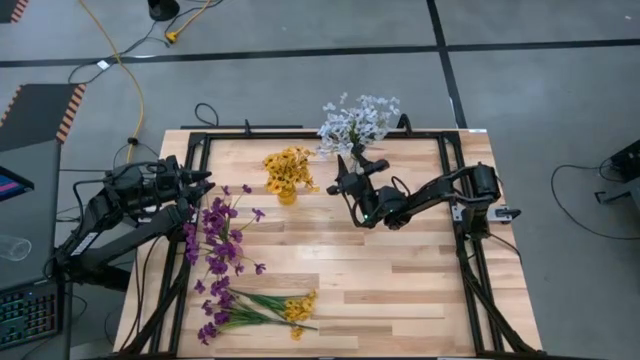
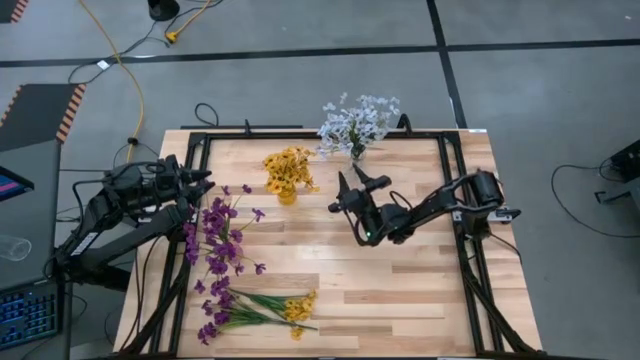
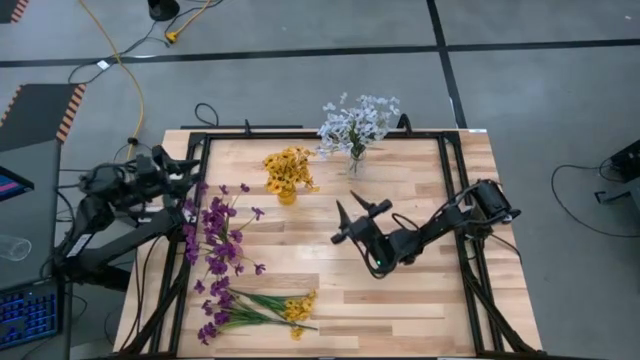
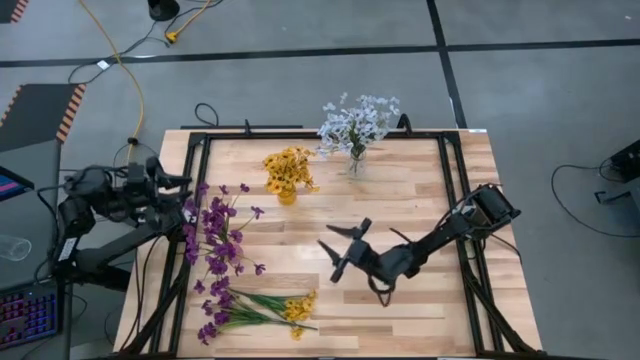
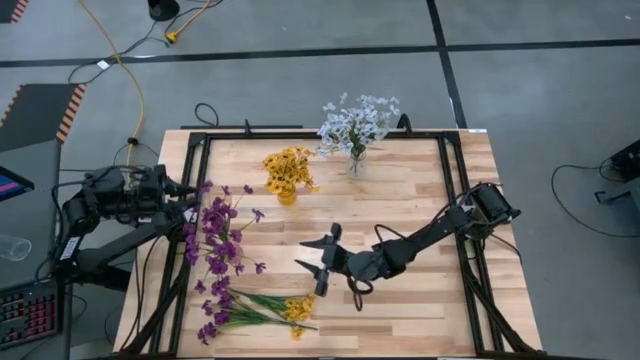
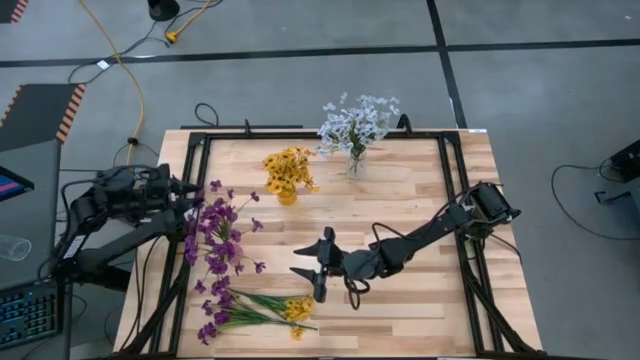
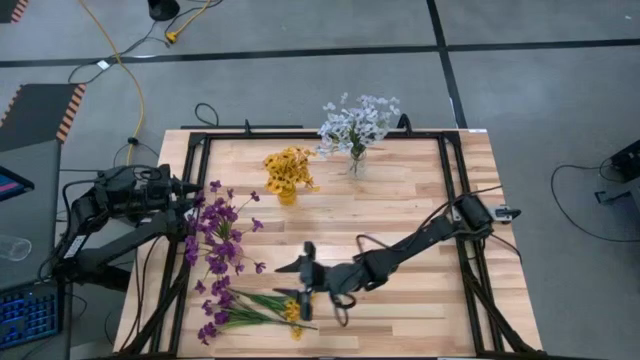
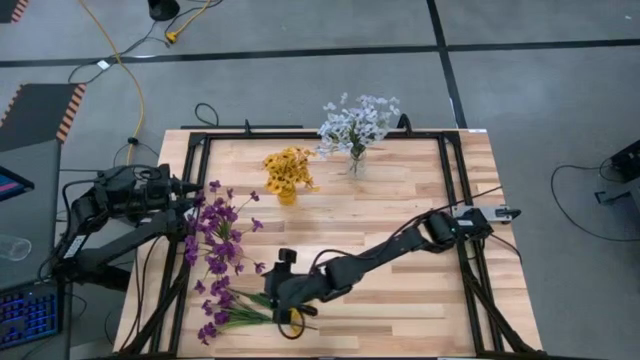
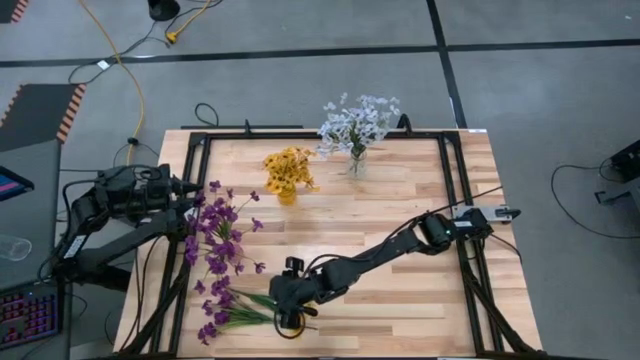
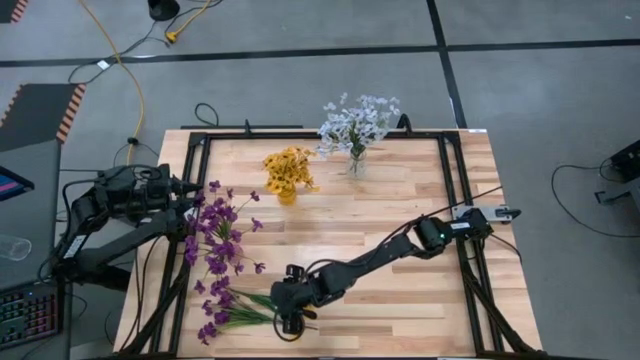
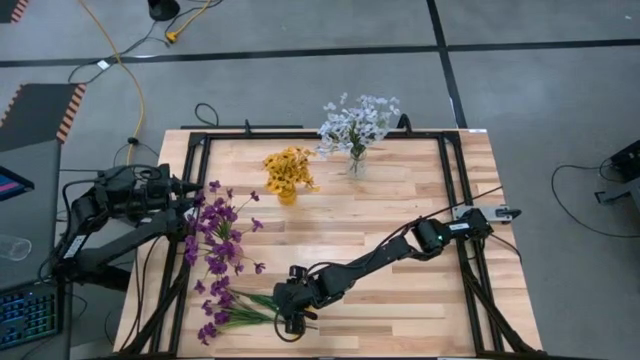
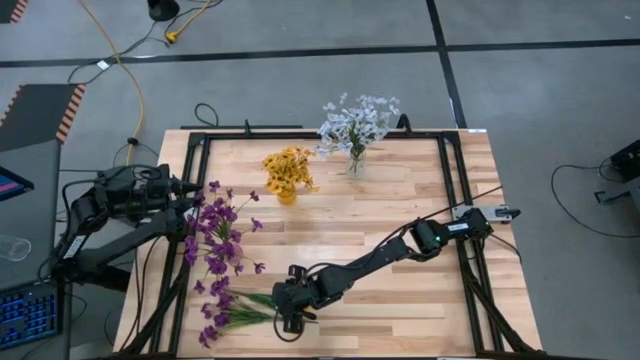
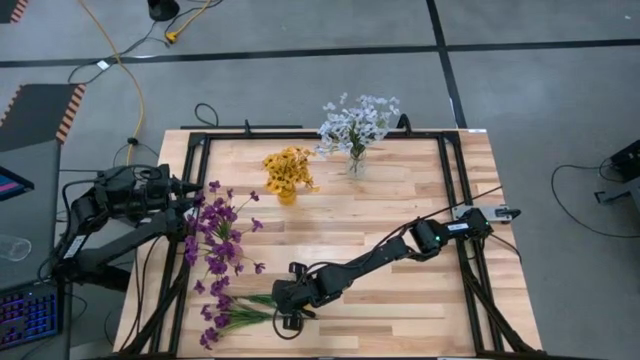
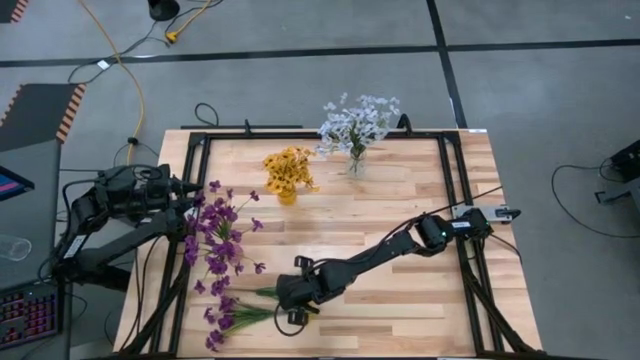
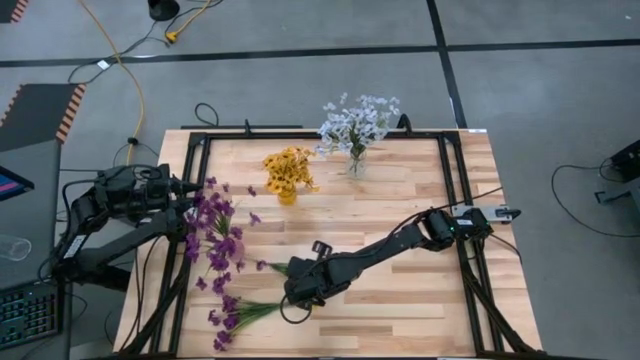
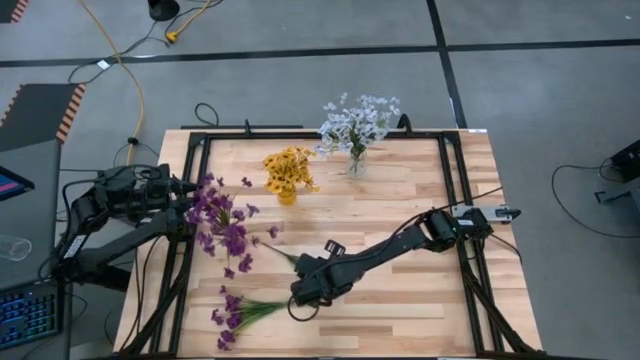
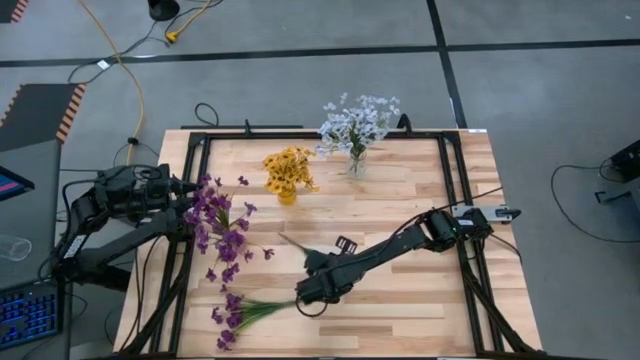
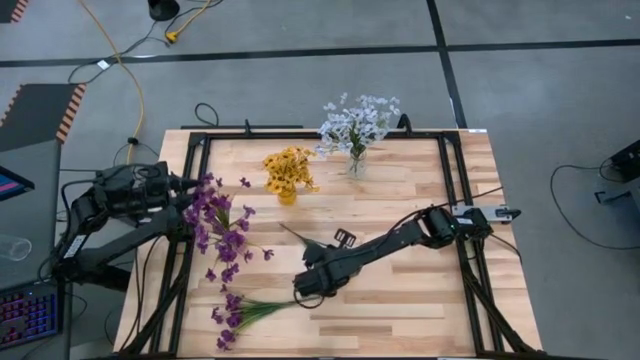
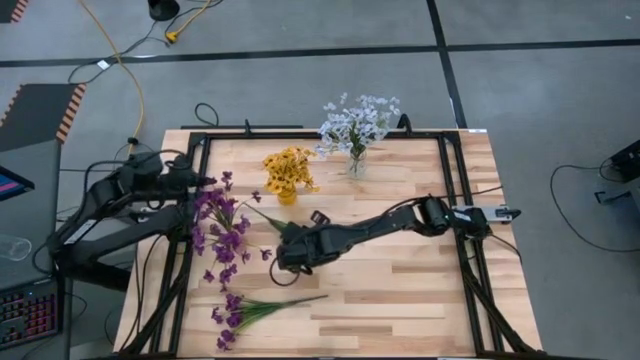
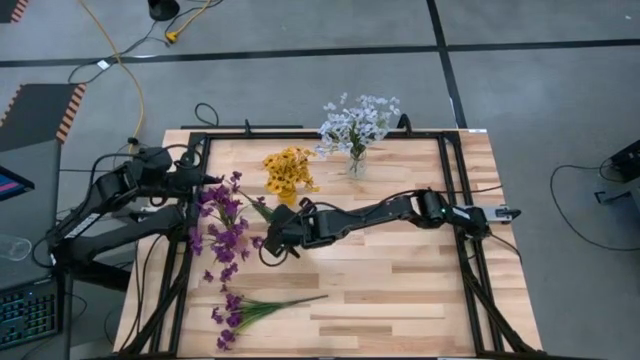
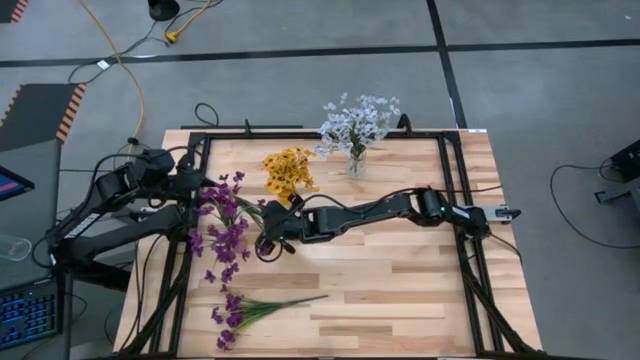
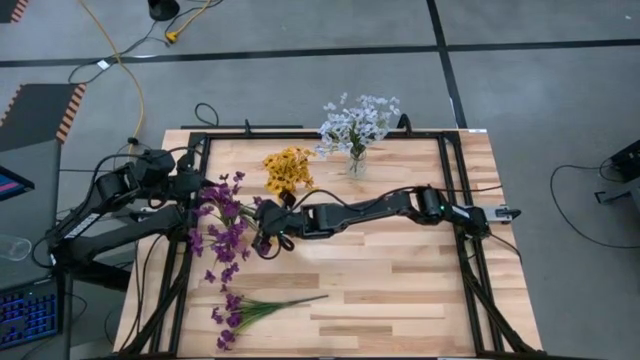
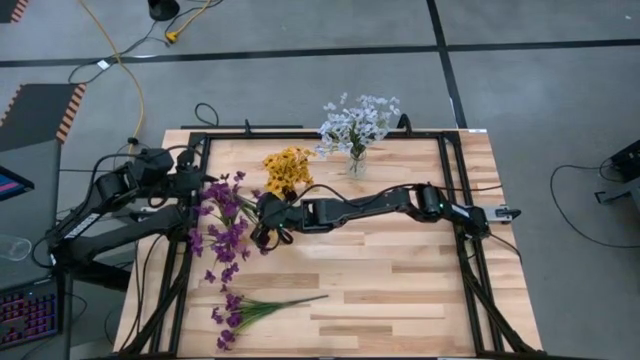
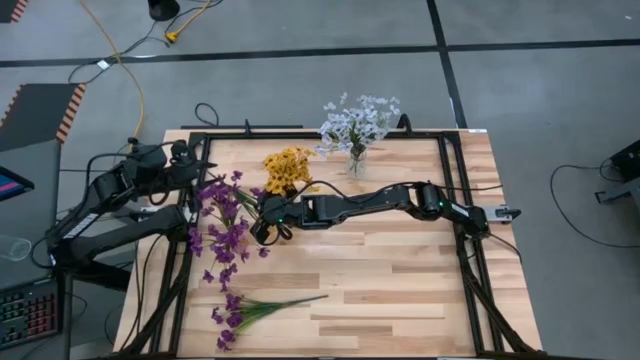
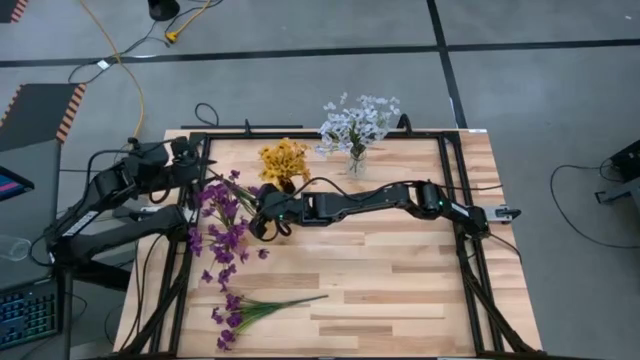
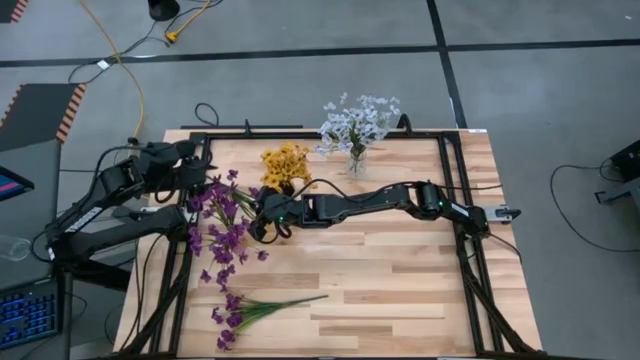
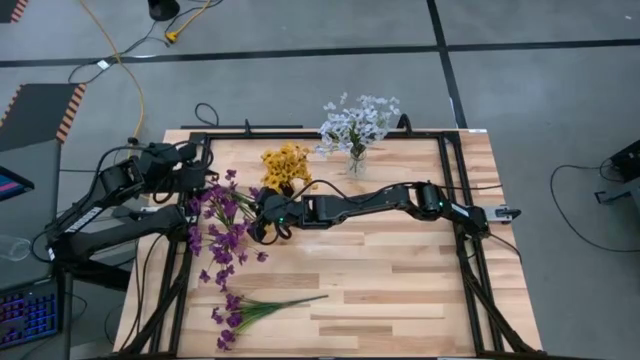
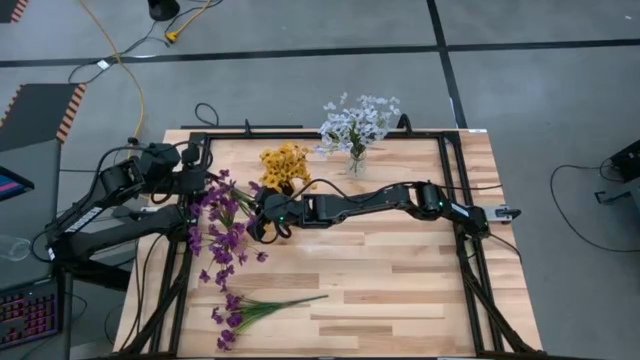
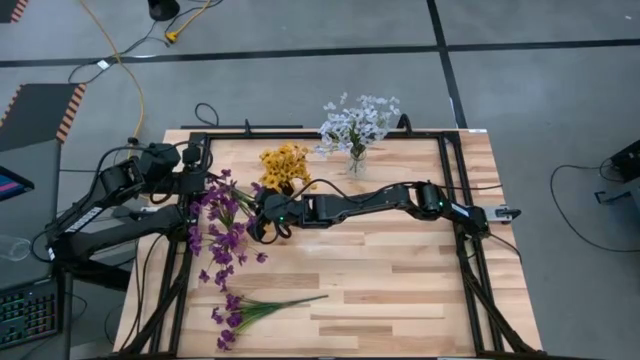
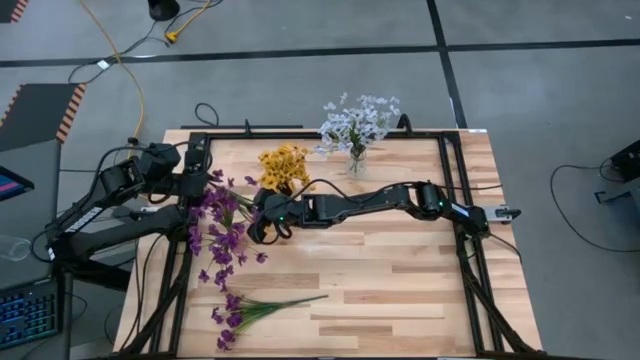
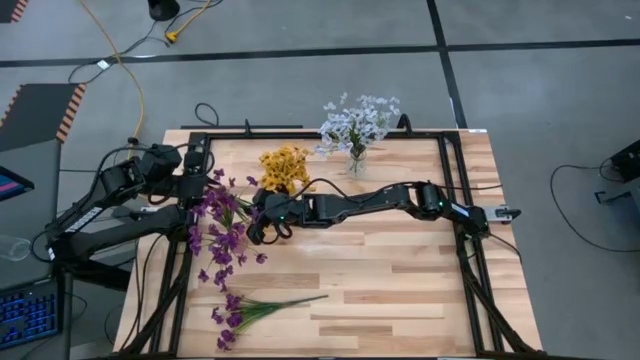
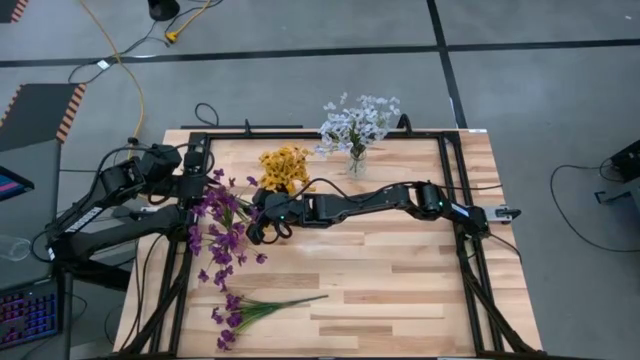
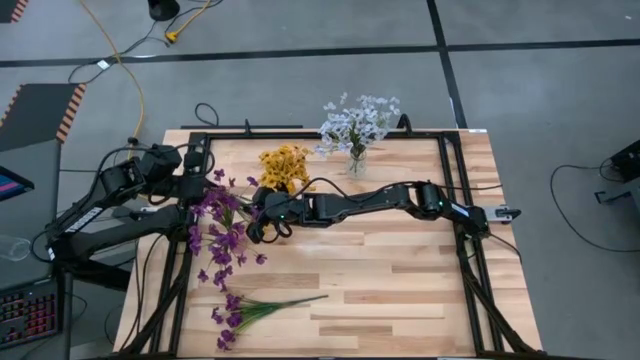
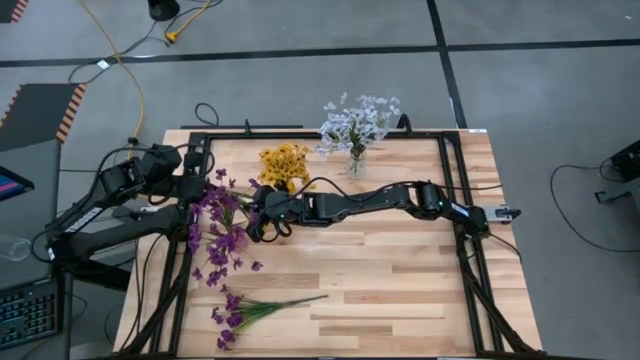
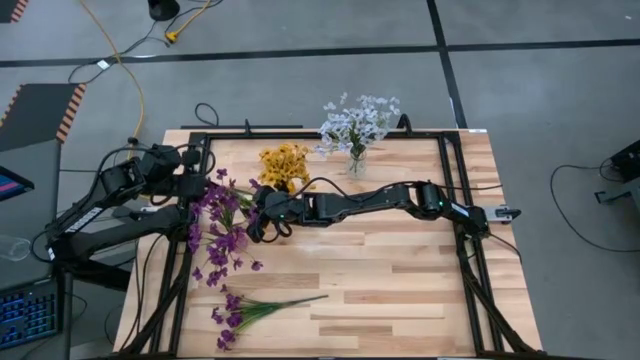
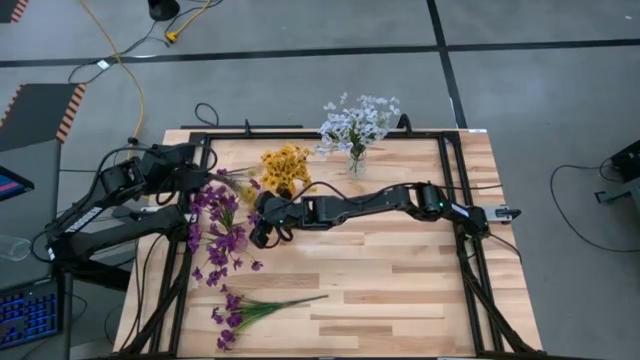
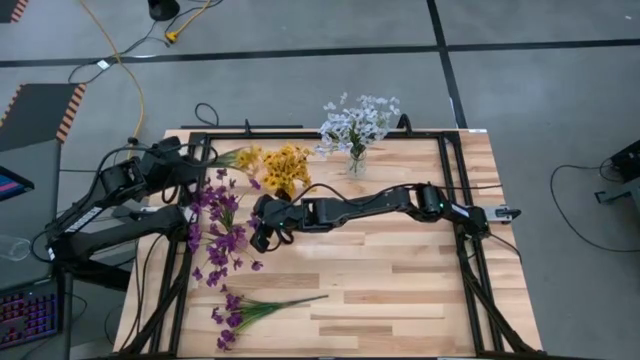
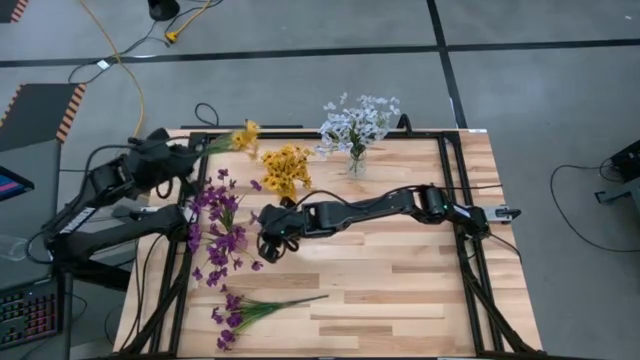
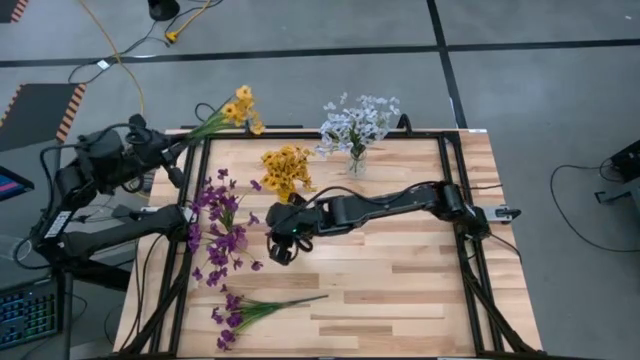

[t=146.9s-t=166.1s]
Task: Sort flowers into vase by color
Put the yellow flowers into the yellow vase

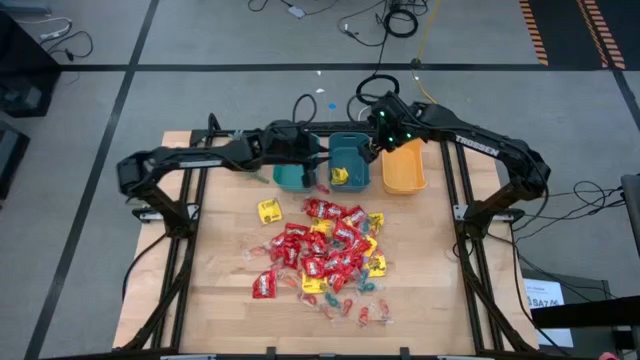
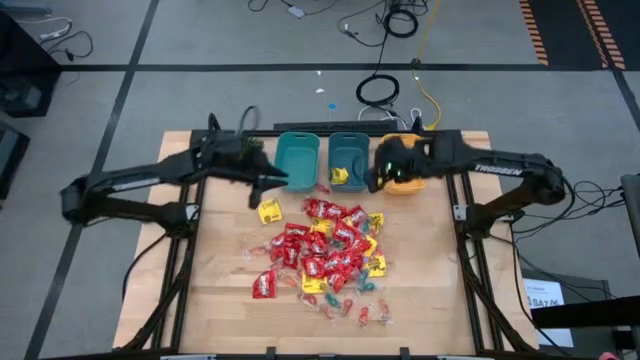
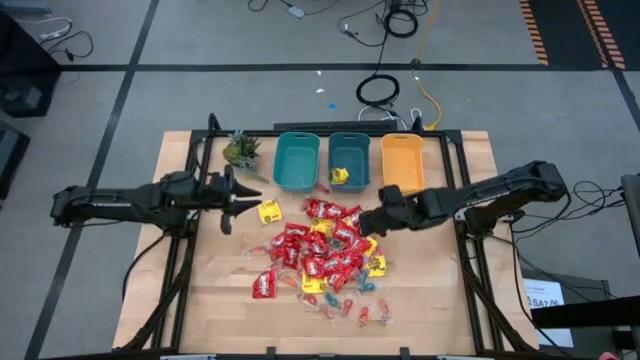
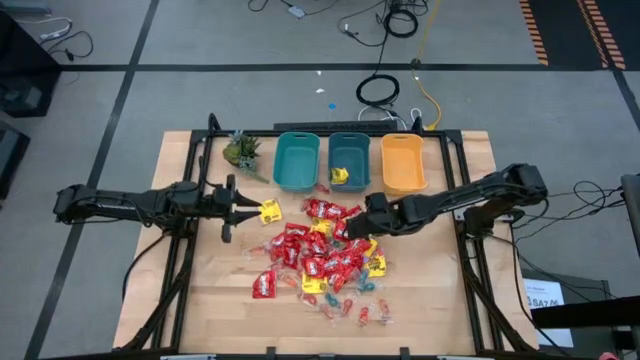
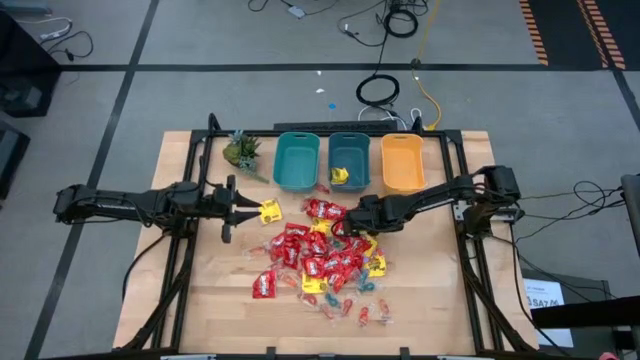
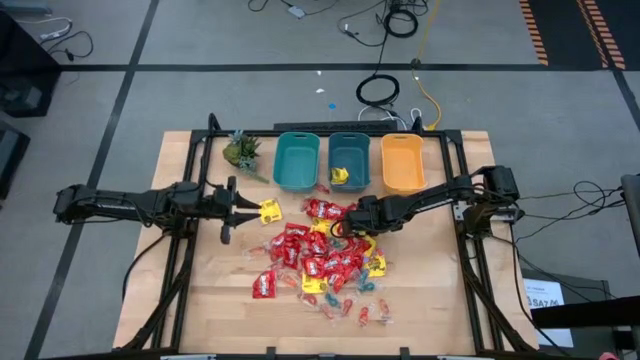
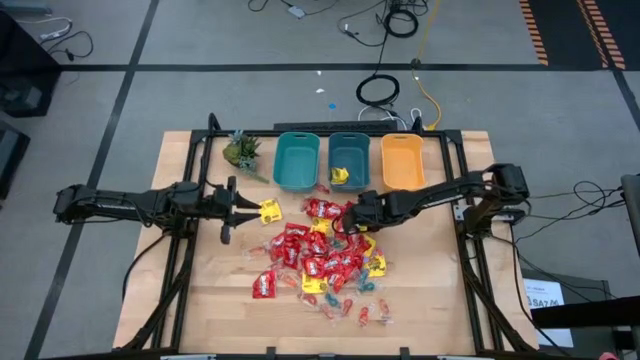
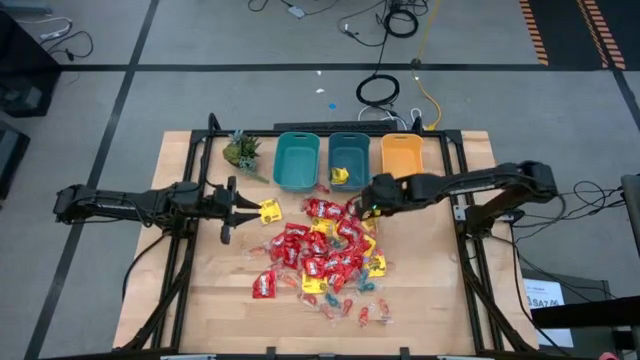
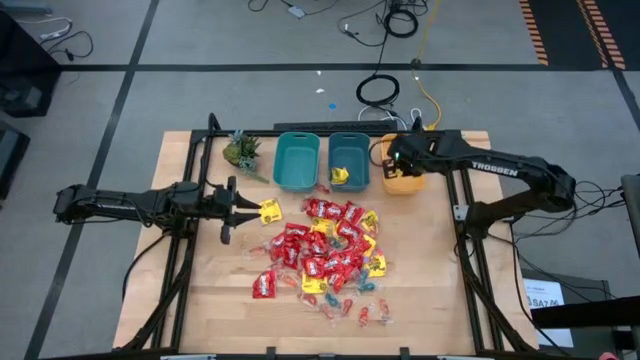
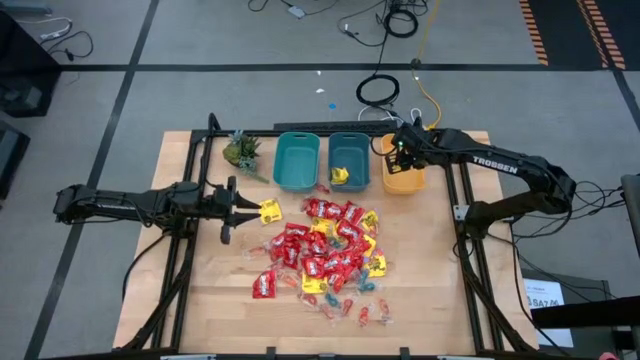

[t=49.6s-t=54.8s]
Task: Sort candy
Put the blue gummy candy into the yellow bin
